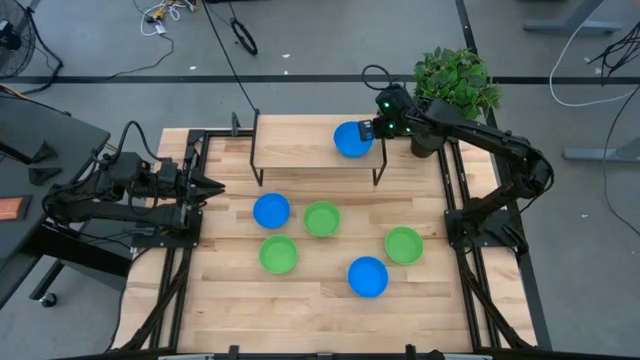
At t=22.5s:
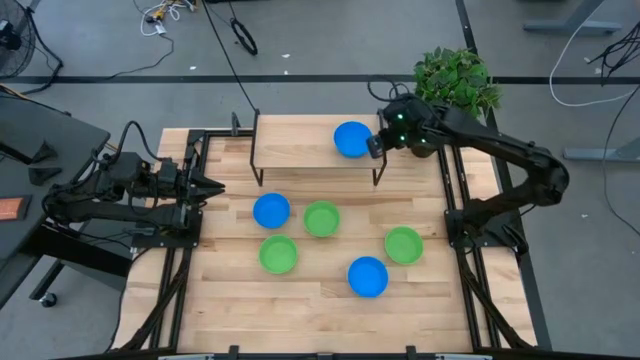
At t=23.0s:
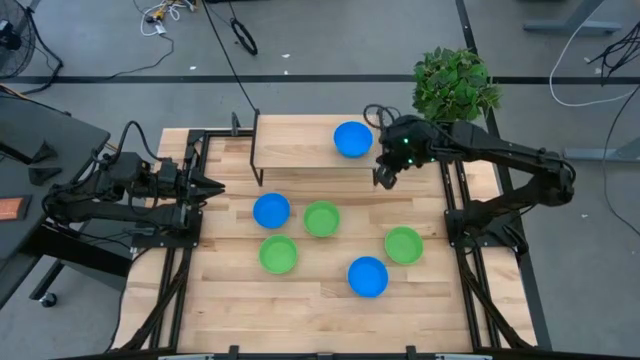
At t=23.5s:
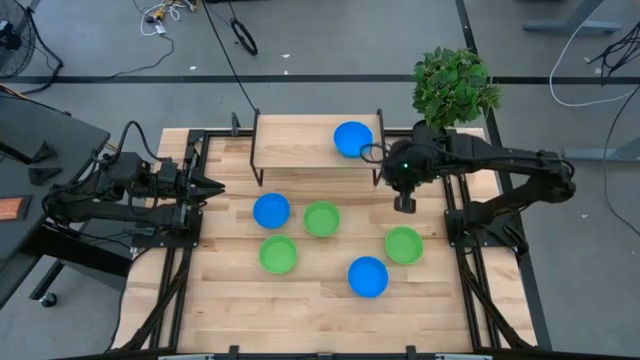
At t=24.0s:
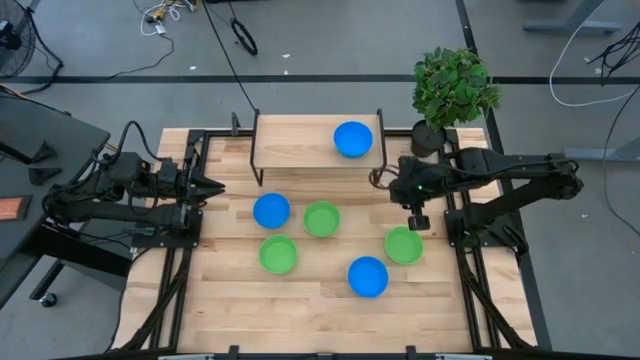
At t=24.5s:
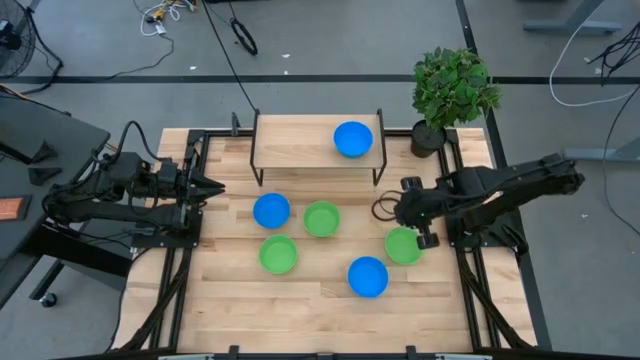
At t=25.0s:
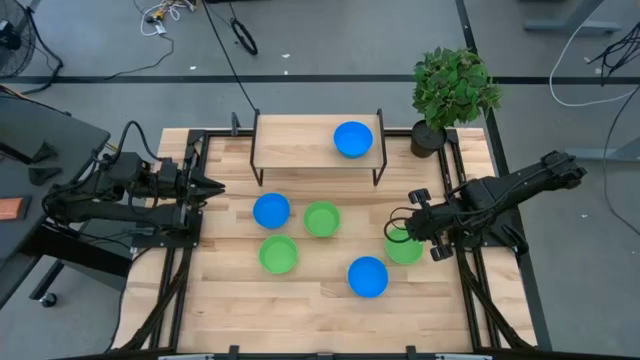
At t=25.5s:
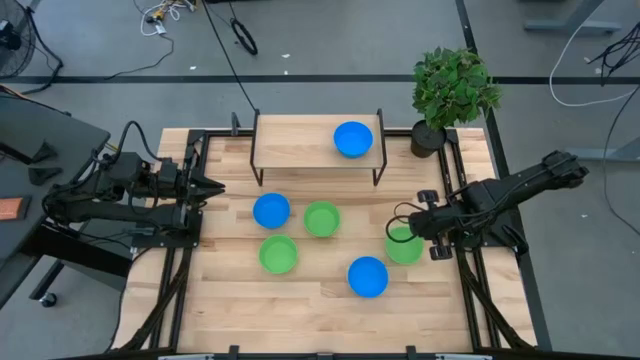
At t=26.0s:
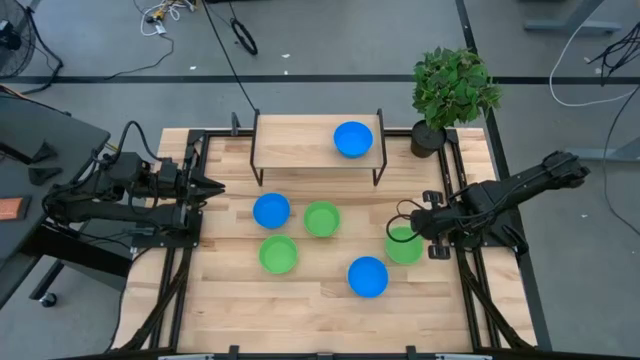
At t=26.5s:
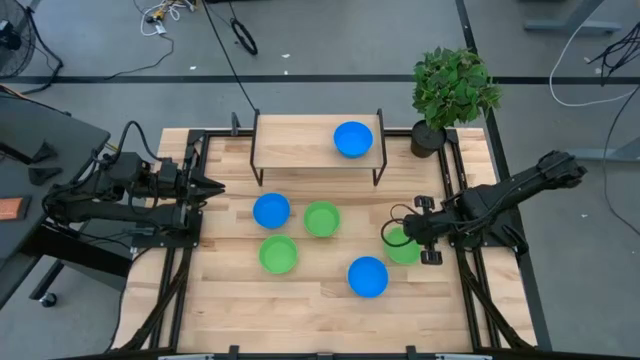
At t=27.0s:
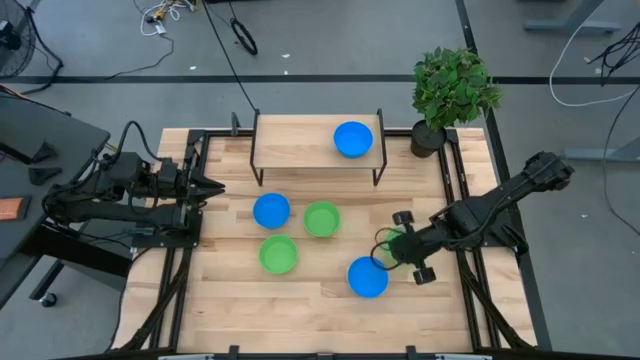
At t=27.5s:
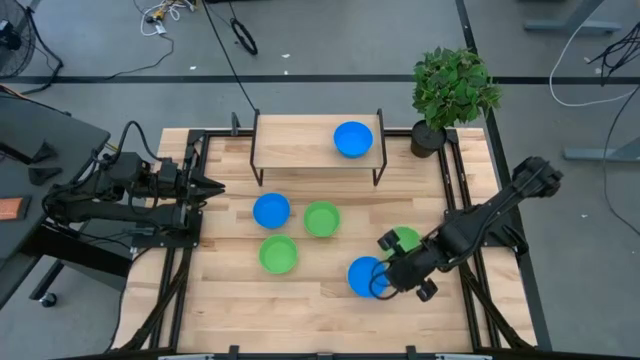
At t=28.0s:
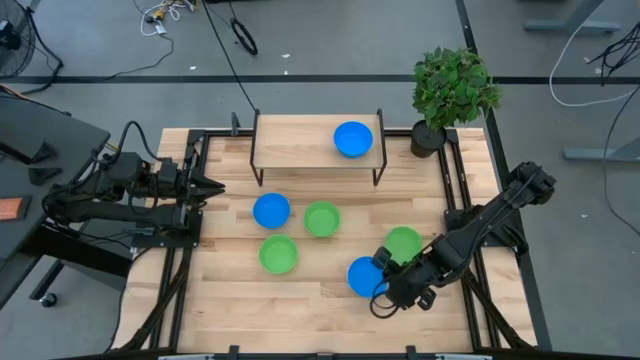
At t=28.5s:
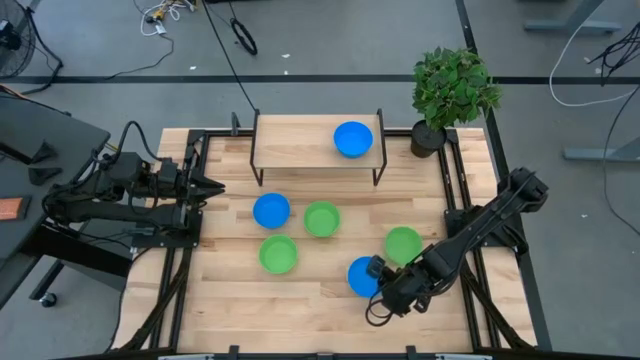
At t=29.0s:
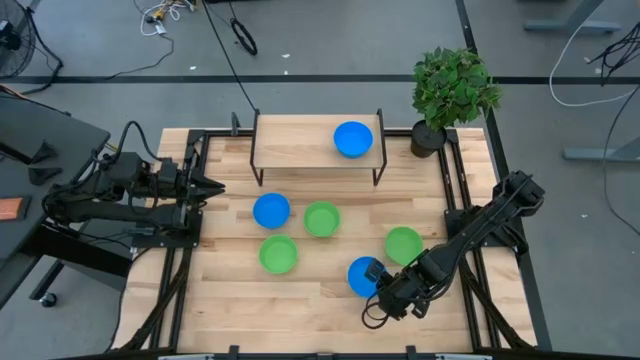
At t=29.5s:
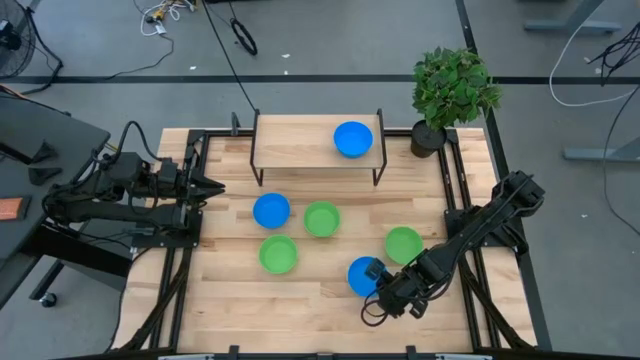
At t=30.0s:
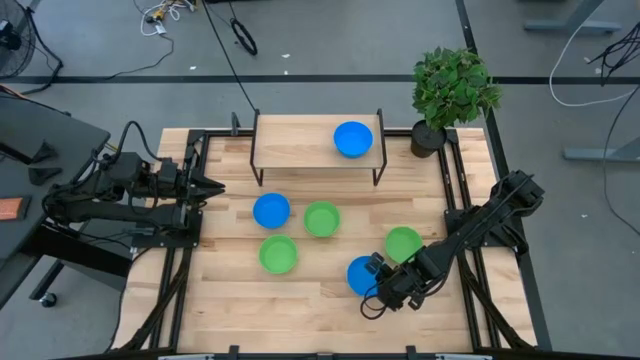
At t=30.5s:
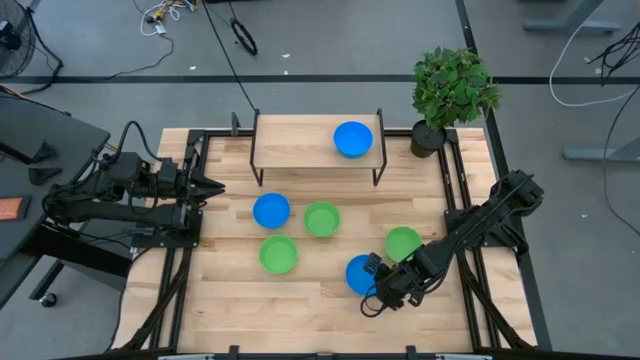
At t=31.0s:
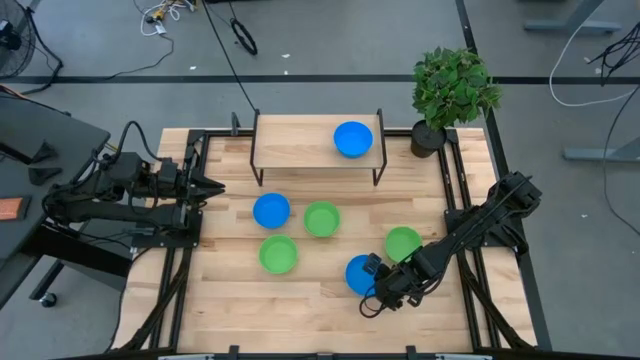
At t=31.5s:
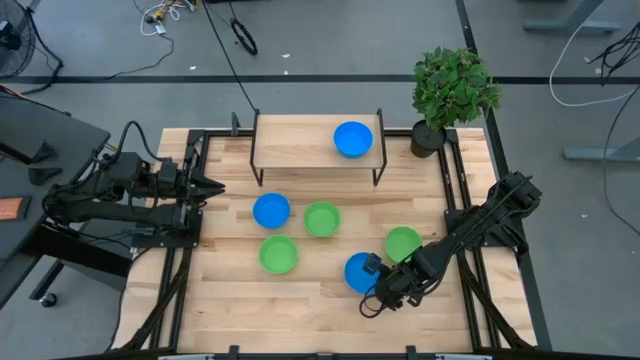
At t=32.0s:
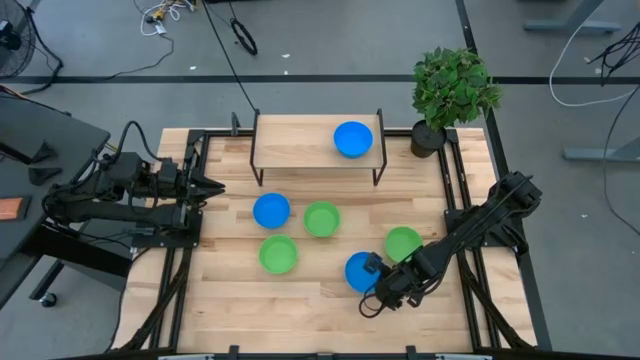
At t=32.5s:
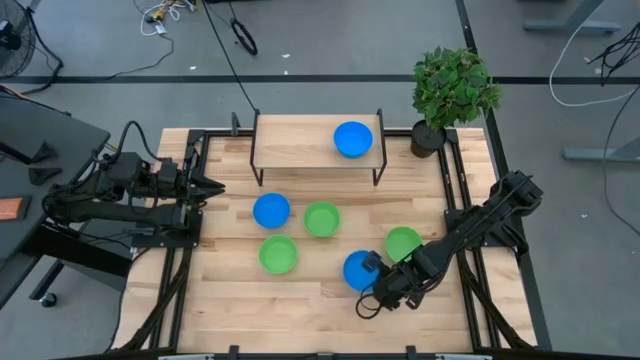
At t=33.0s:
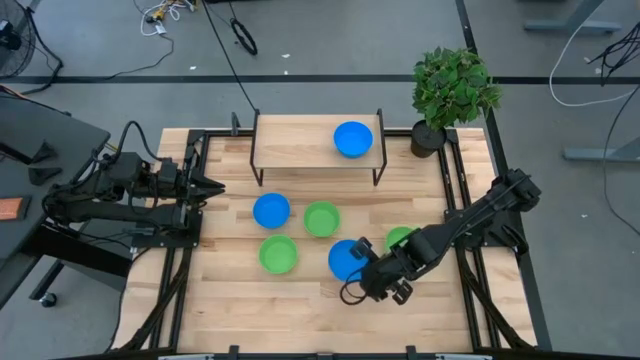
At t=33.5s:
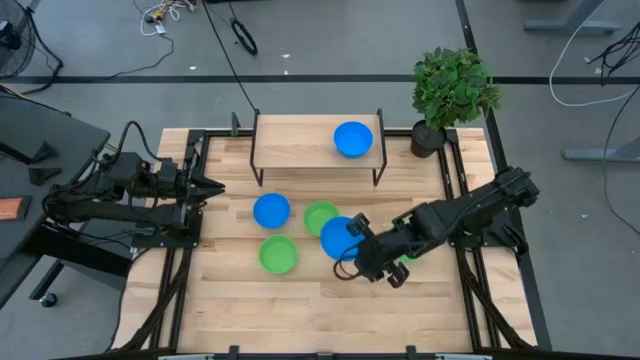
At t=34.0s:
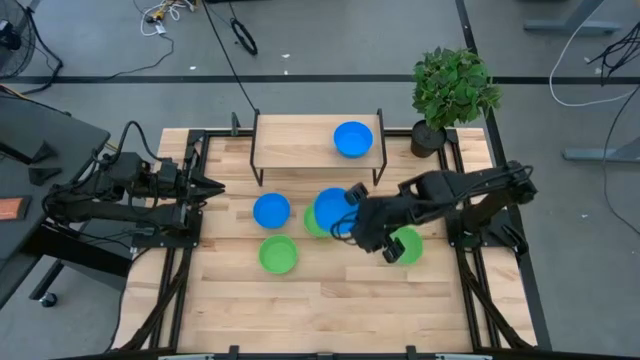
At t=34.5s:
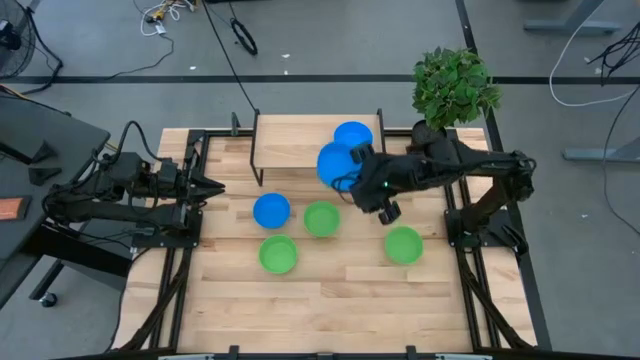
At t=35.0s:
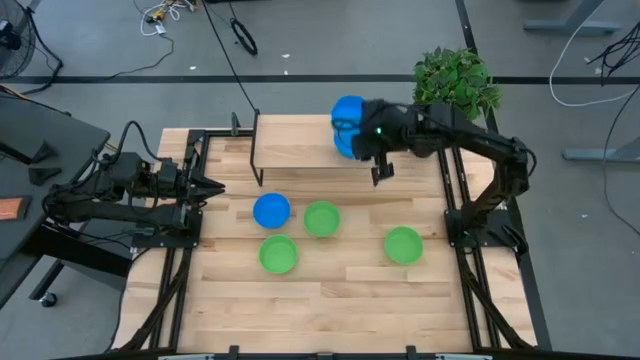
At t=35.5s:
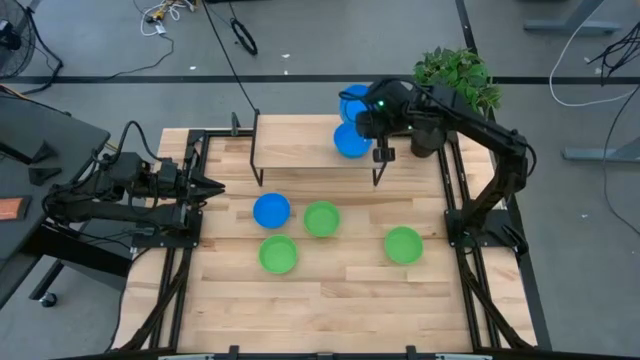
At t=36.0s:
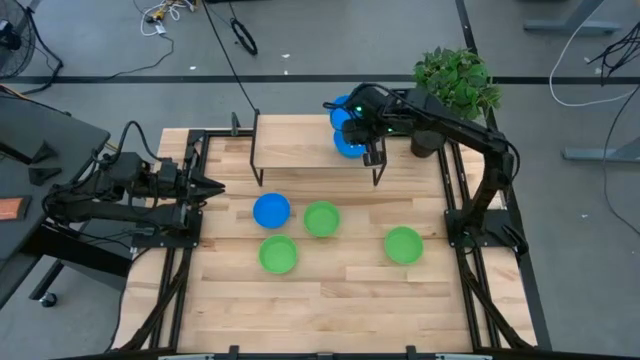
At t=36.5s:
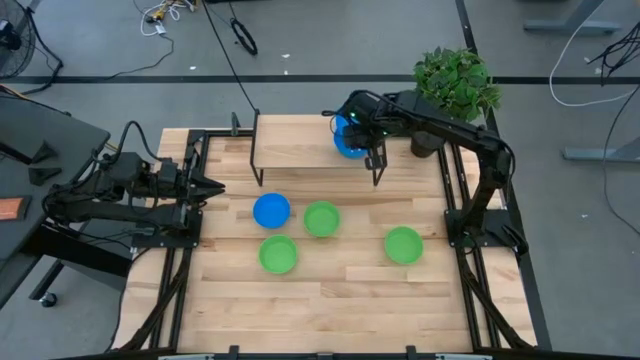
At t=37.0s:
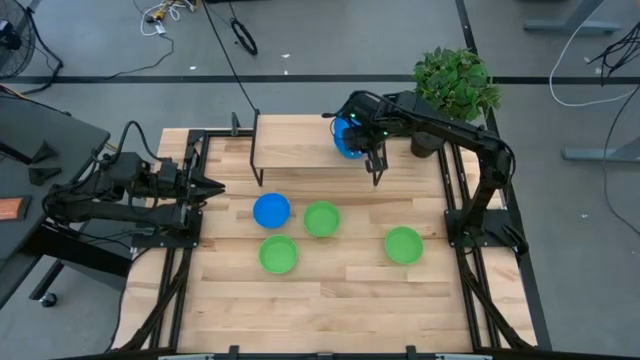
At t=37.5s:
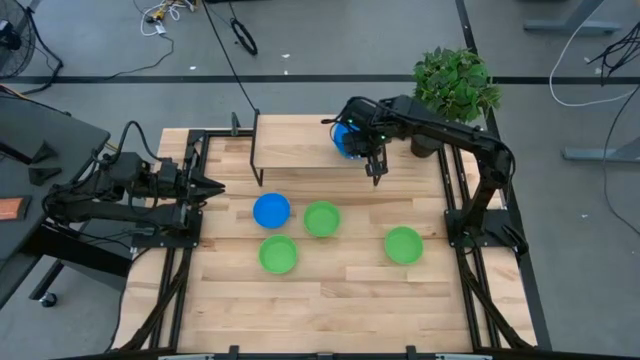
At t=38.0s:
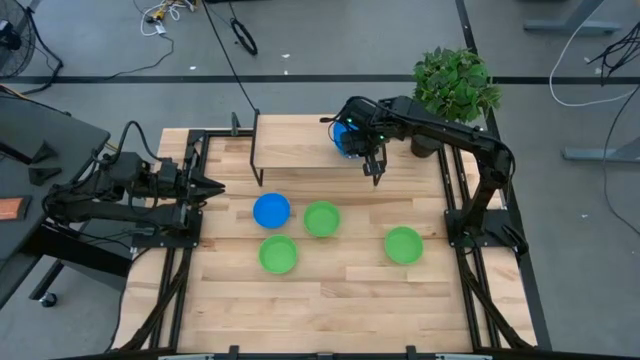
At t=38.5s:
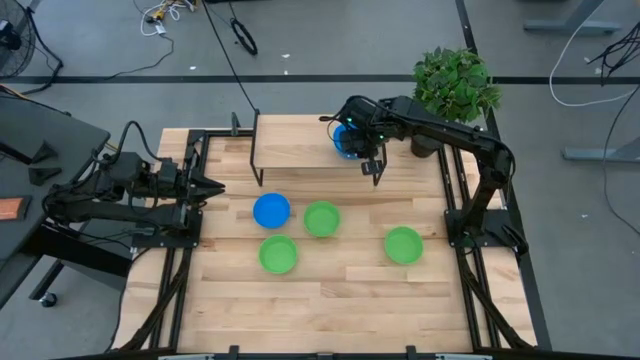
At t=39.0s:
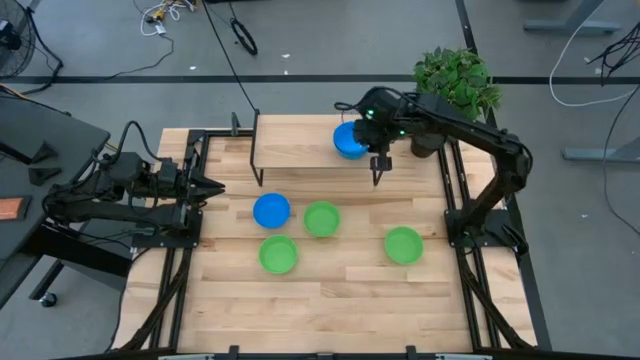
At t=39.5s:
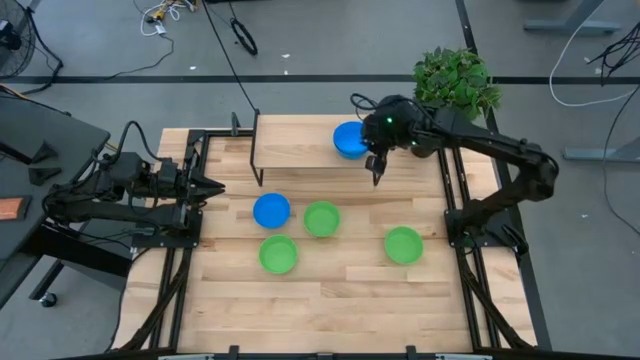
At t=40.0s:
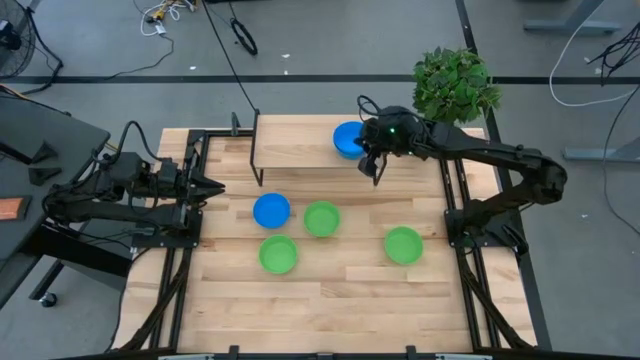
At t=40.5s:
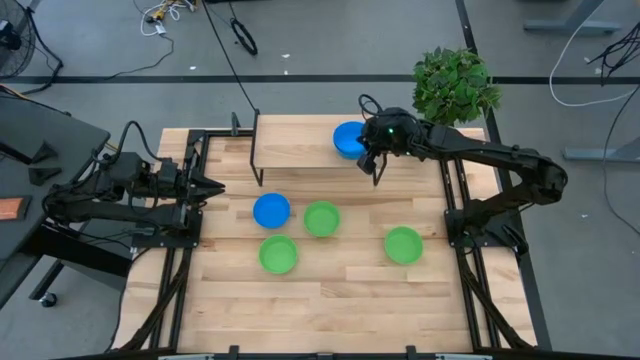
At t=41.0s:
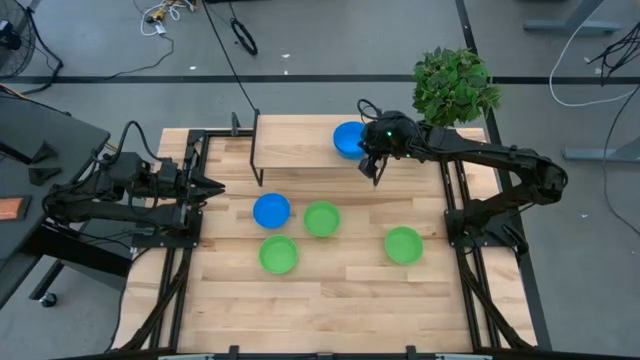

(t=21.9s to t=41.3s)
Task: Pick & Place Mini bowls
Stack the bottom blue bowl on the blue bowl on the shelf

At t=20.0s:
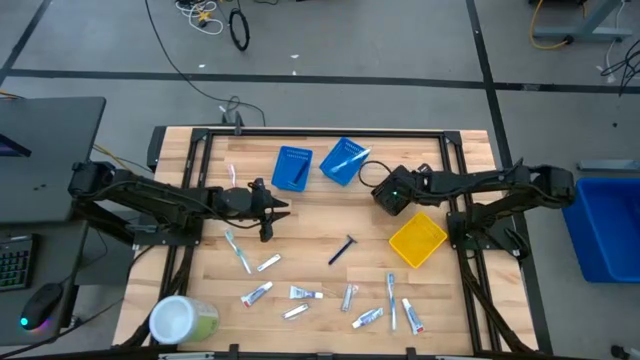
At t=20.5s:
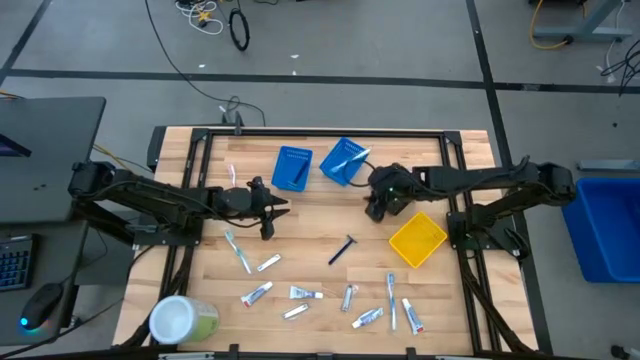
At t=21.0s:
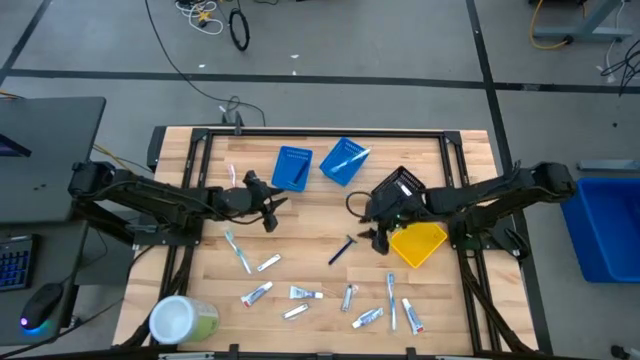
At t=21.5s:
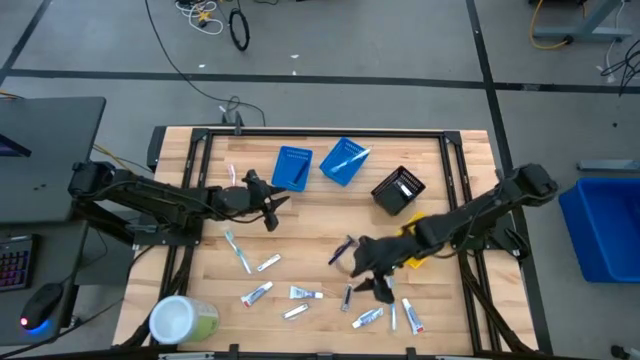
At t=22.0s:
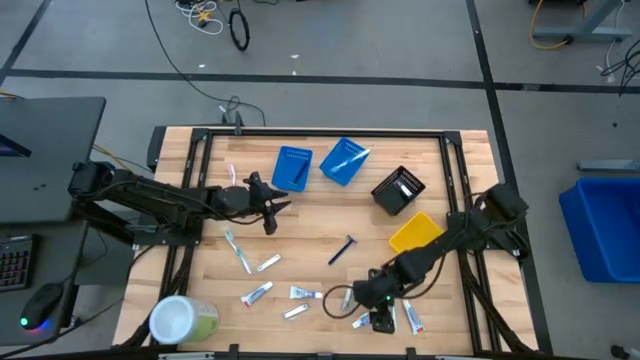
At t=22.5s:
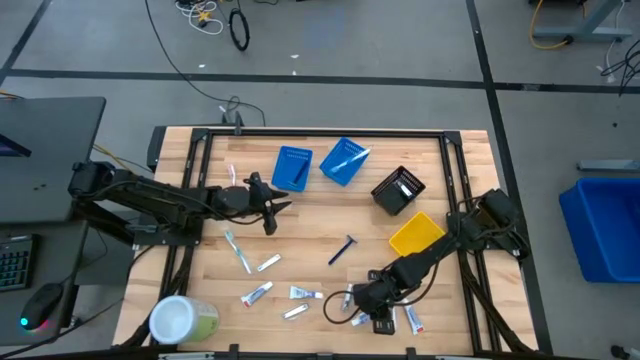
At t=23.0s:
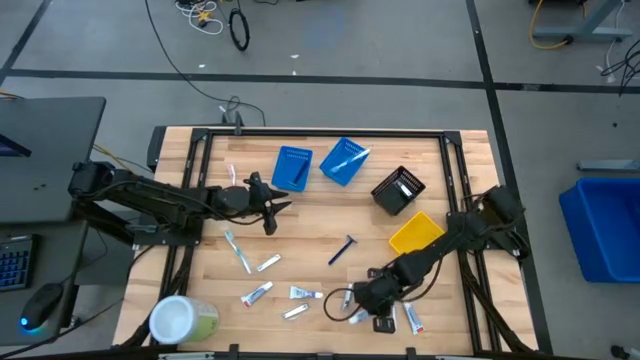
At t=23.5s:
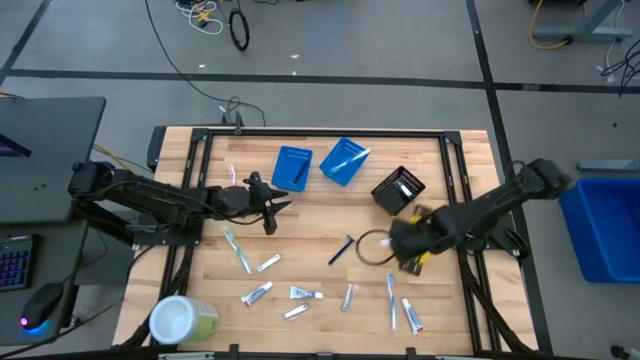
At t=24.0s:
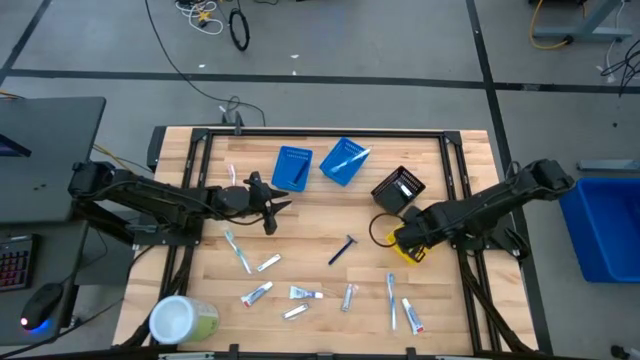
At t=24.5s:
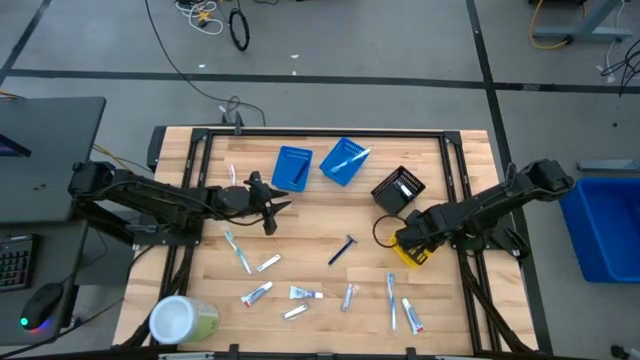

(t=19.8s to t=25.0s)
Task: Pick & Place Travel size toiletries
Put the white toothpaste into the yellow basket
